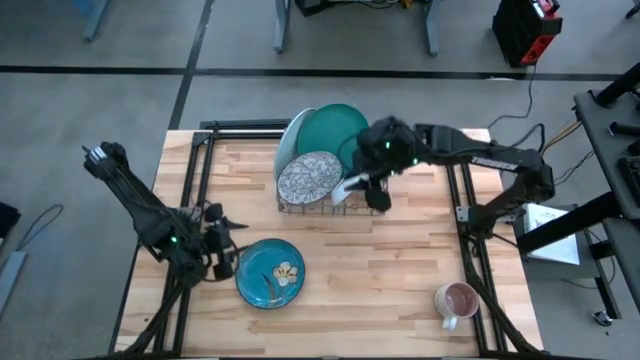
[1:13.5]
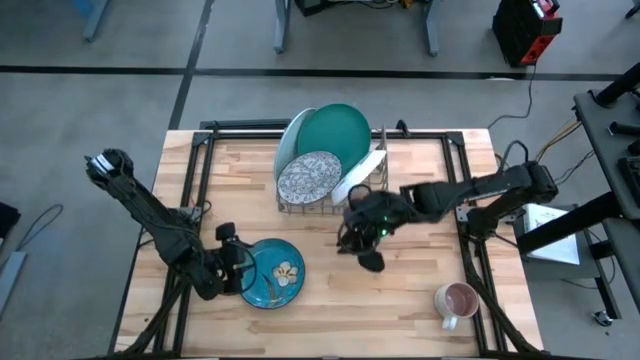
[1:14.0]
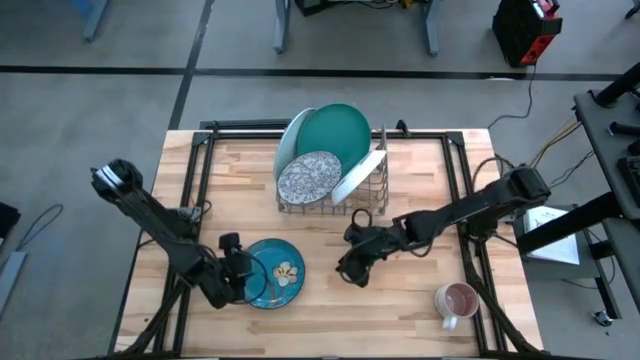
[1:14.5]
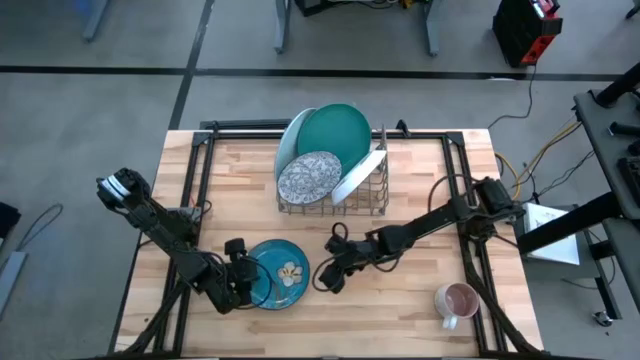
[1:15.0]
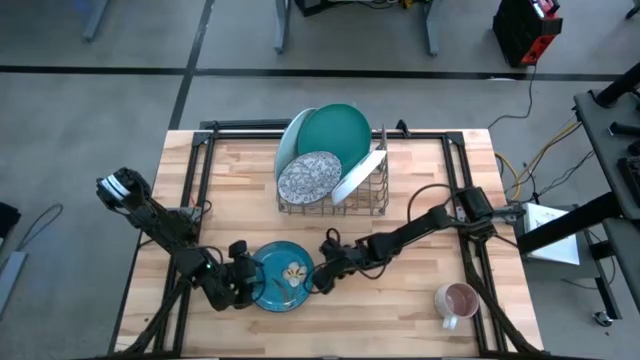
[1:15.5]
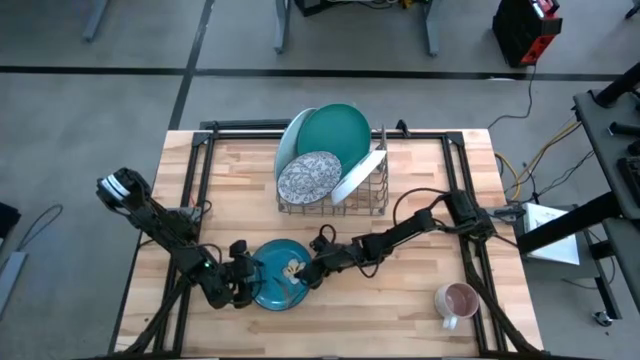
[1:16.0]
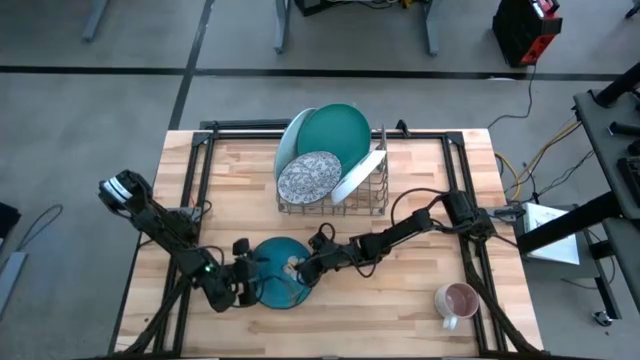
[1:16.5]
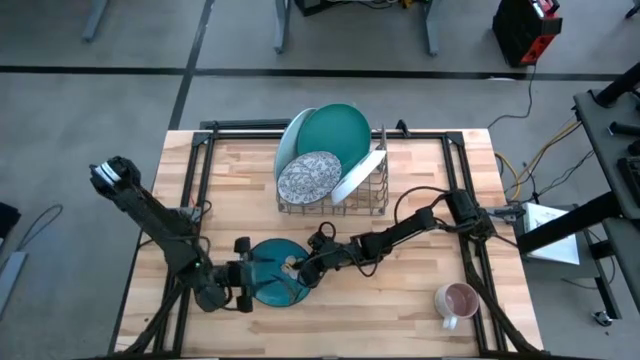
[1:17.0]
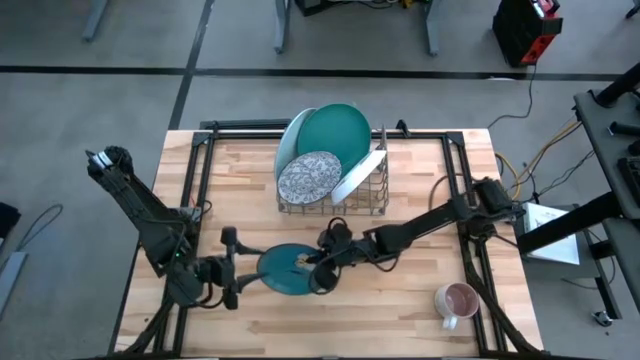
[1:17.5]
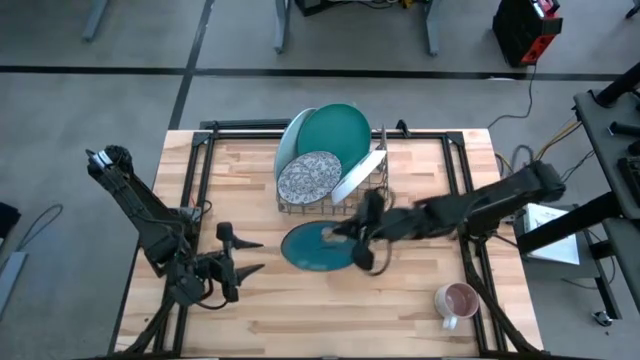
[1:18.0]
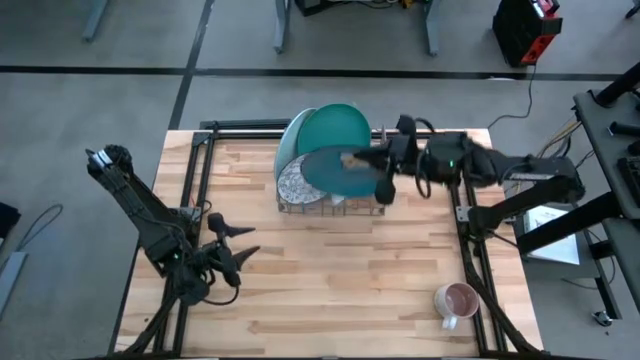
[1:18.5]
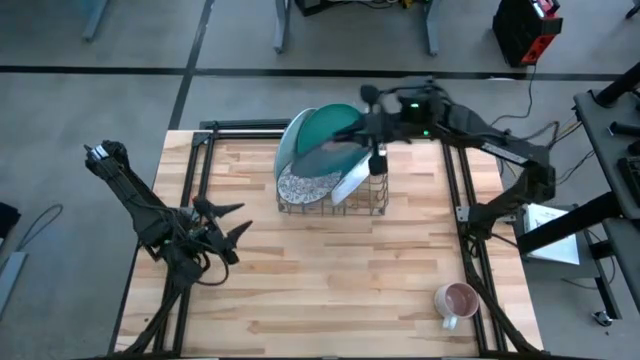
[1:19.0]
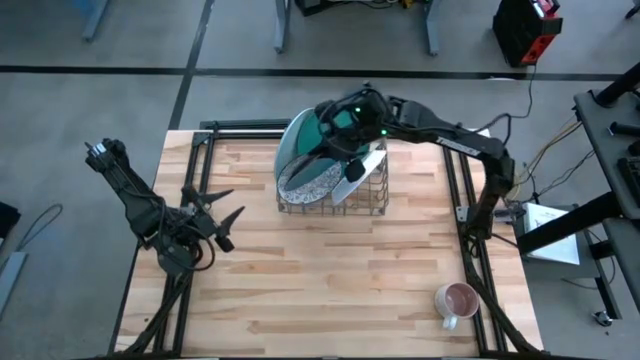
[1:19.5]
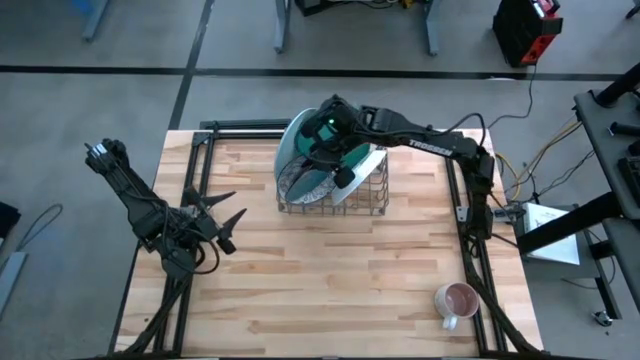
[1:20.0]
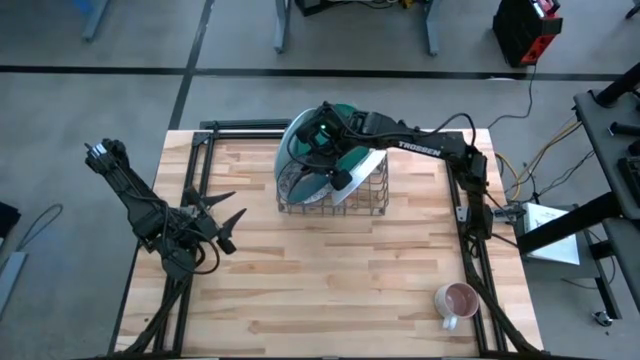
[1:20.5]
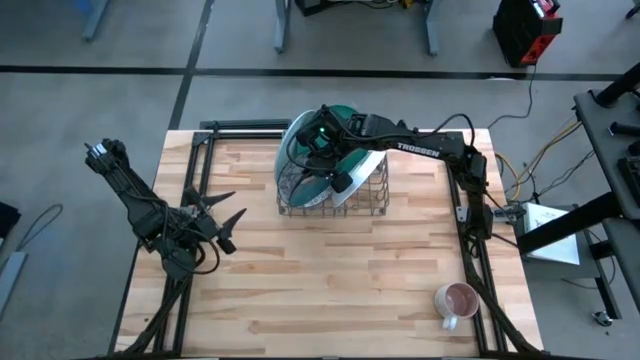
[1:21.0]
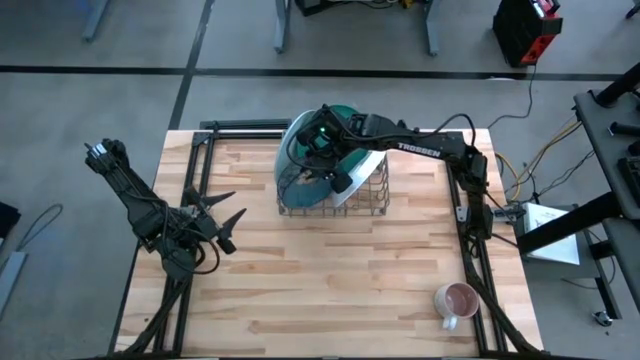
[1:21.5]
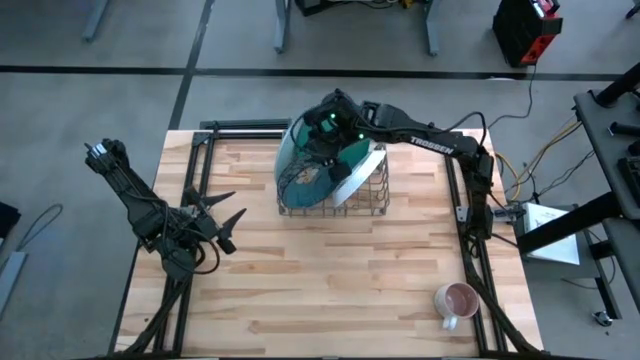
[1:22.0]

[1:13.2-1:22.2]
Task: Sort dishes
Put the green flower patterned plate into the dish rack

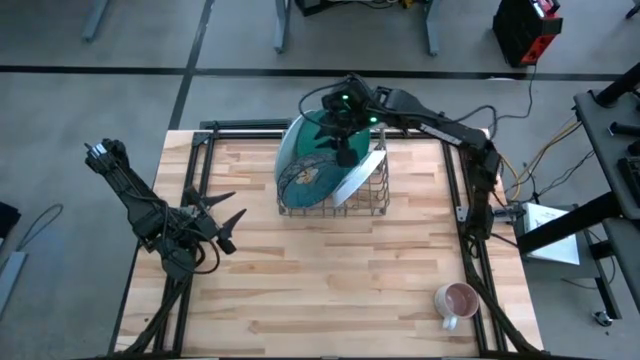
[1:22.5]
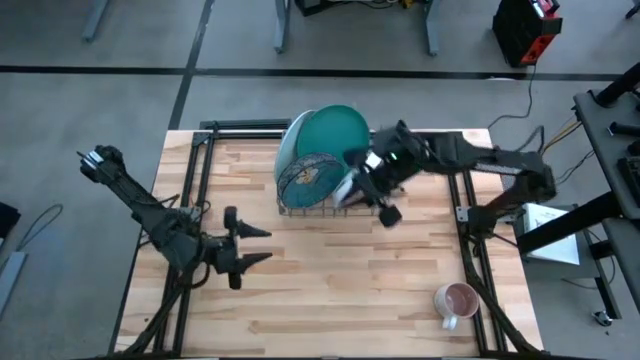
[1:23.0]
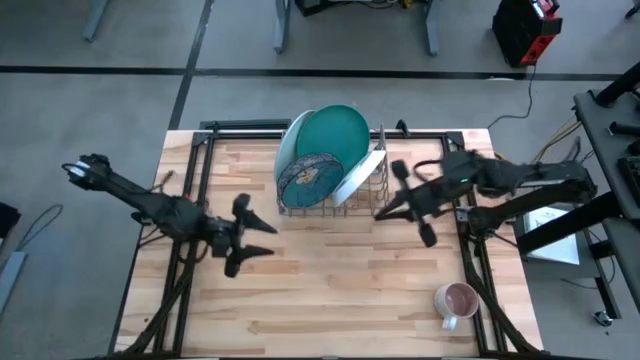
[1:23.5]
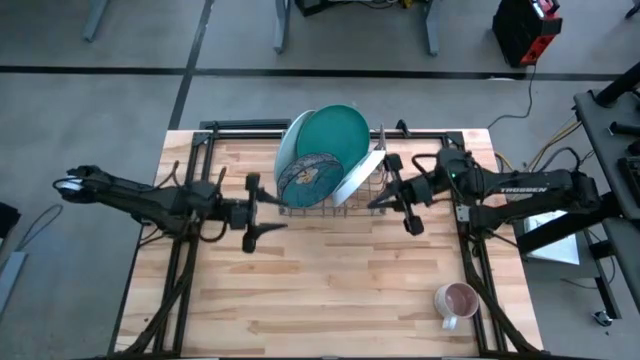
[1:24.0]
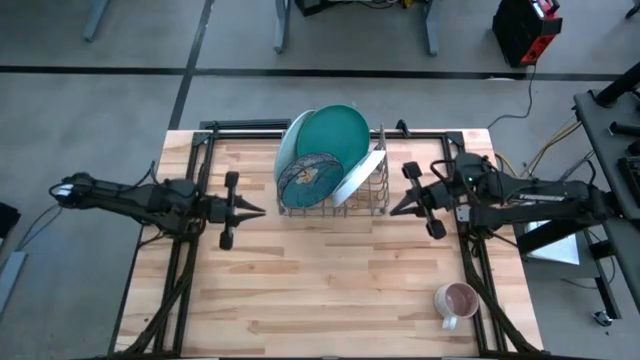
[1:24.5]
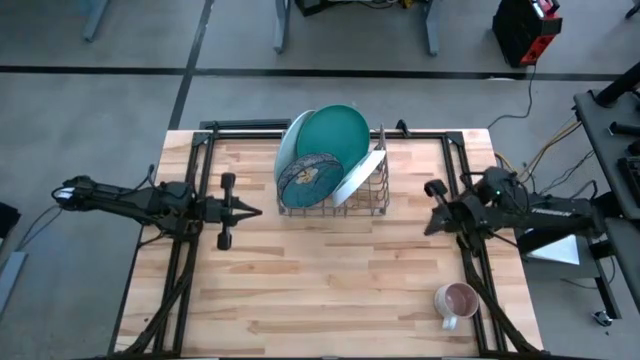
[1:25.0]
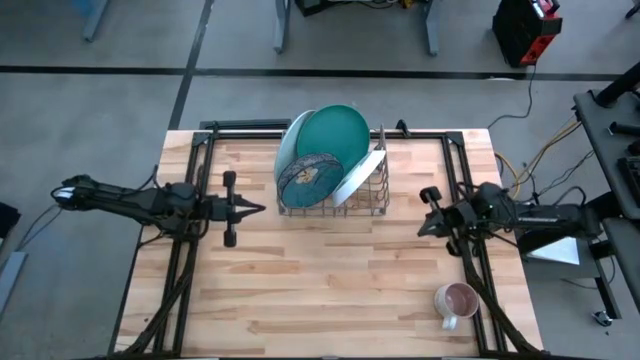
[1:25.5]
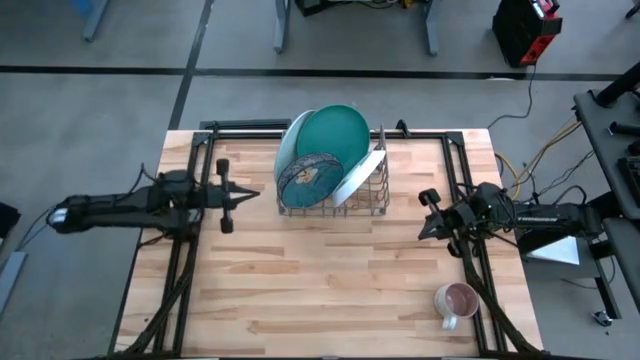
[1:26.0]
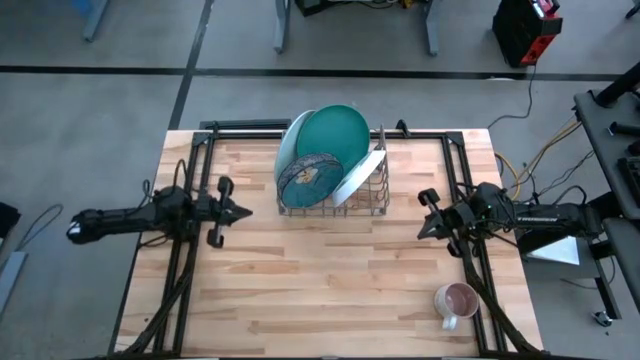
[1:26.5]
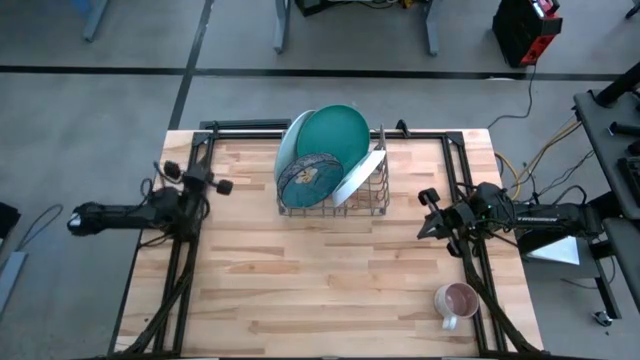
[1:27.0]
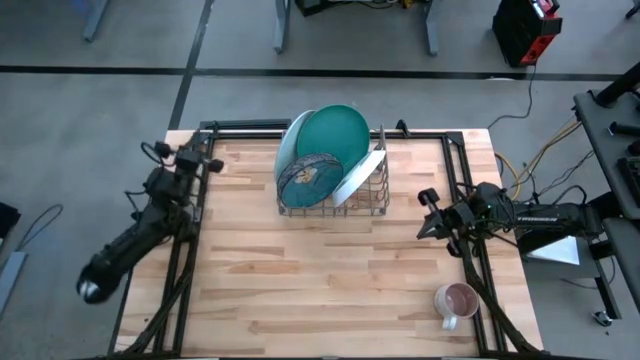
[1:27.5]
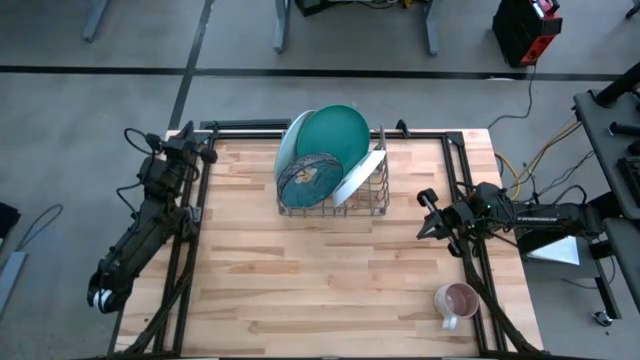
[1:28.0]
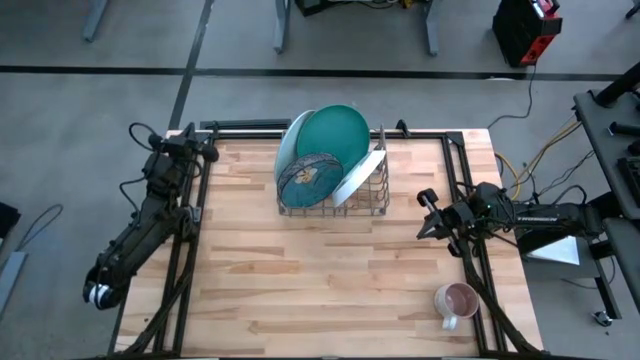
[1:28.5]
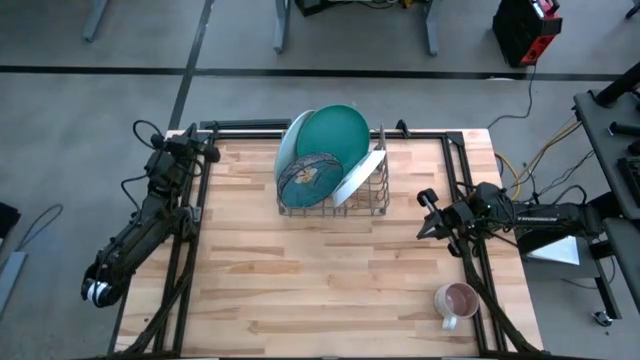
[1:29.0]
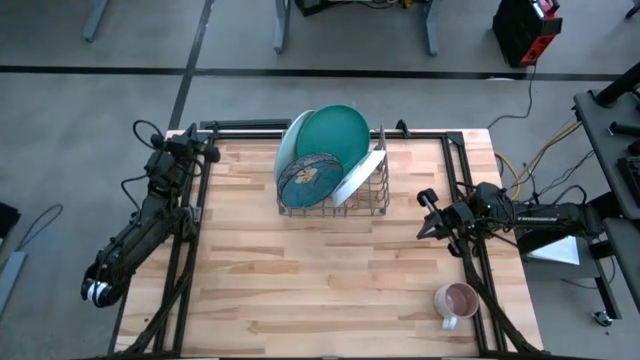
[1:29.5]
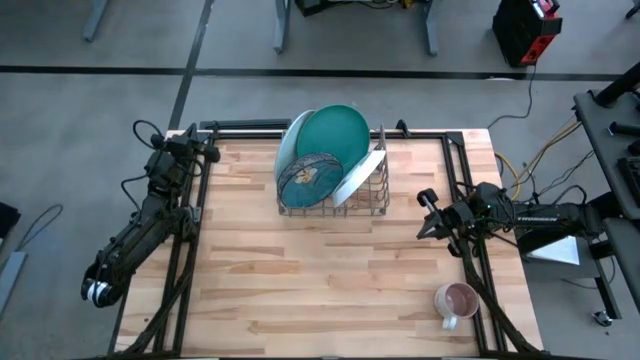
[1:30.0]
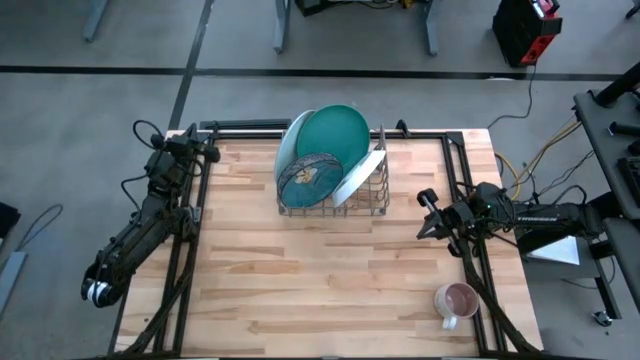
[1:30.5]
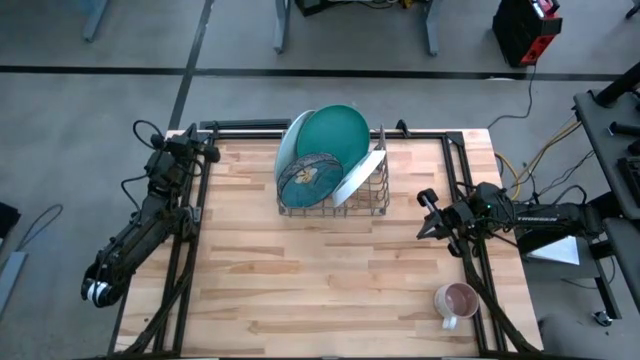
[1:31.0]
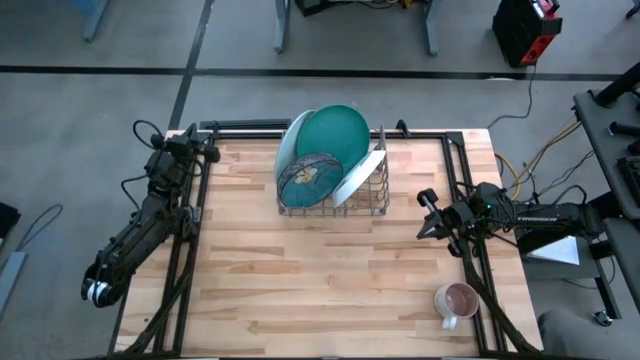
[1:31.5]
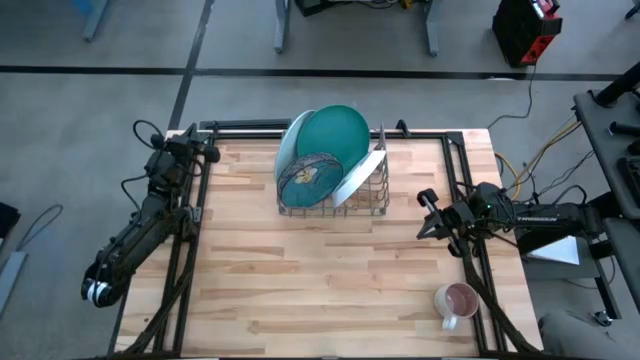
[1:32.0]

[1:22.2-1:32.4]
Return to Home Position

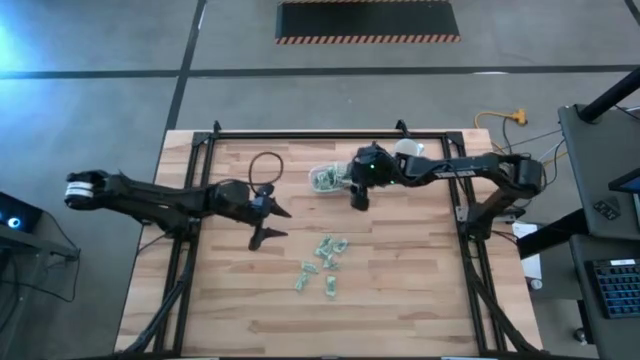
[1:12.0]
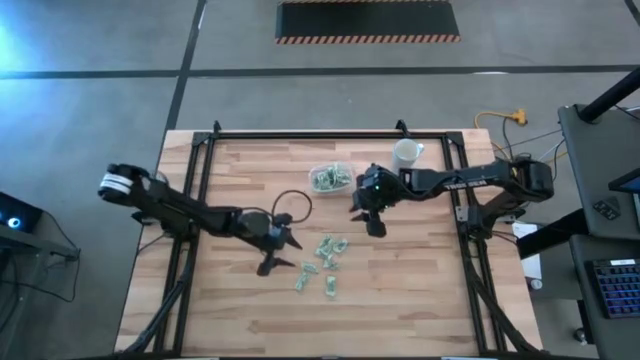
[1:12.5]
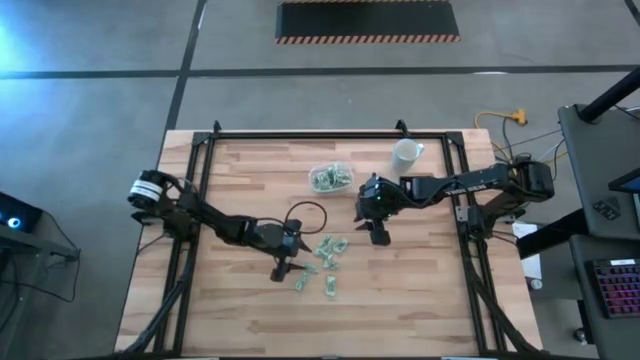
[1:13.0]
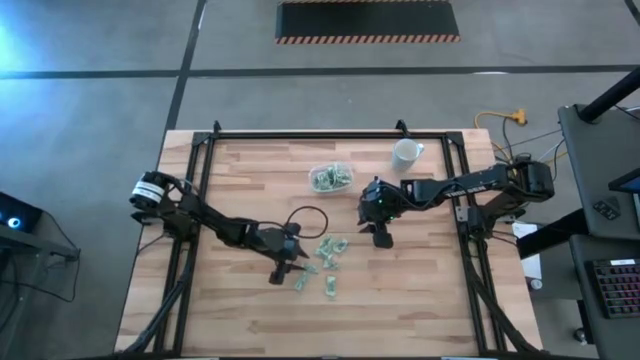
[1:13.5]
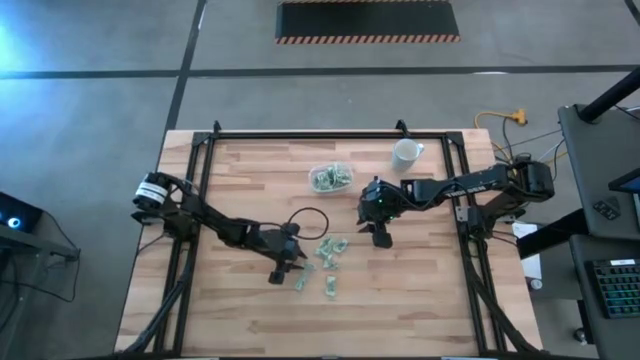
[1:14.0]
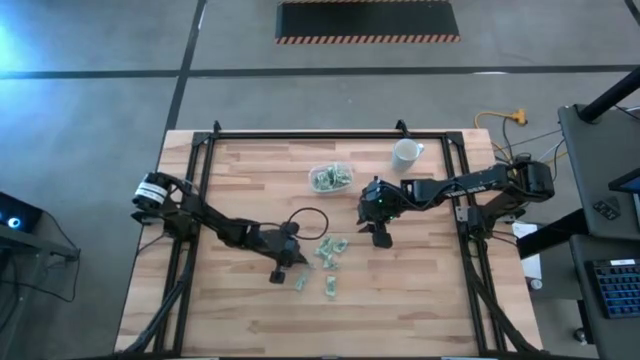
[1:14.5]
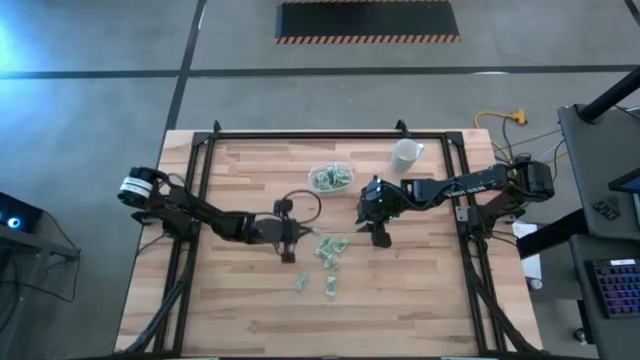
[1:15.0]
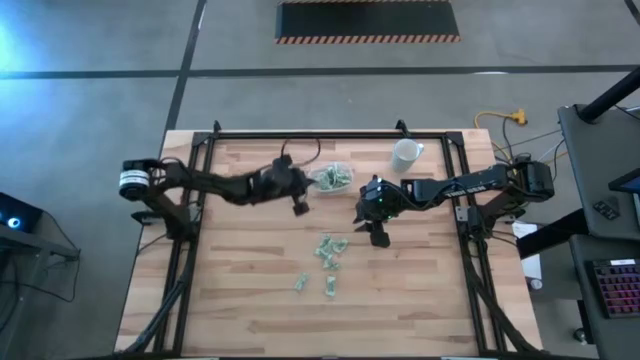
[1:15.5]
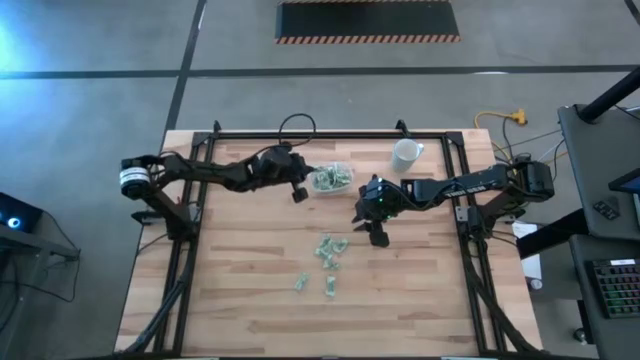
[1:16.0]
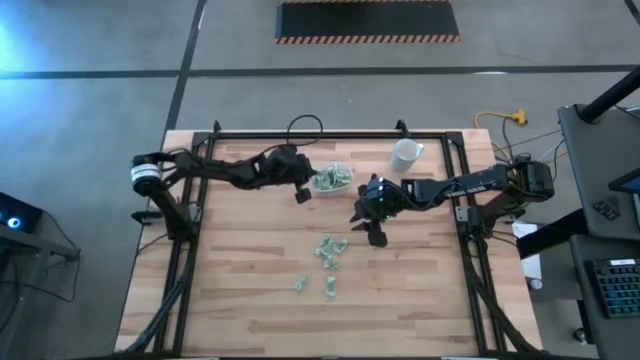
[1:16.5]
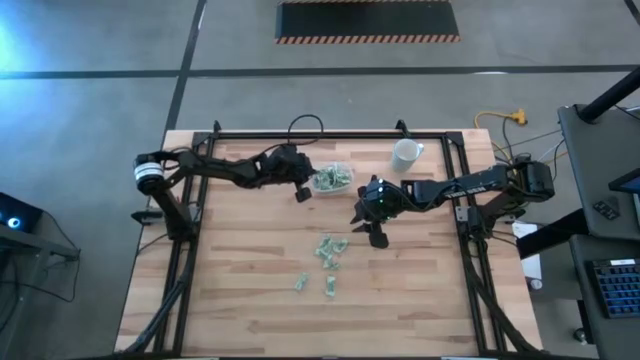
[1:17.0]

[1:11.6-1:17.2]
Task: Pick and place Stevia / Truvia into bins
Put the stevia packet into the transparent container
